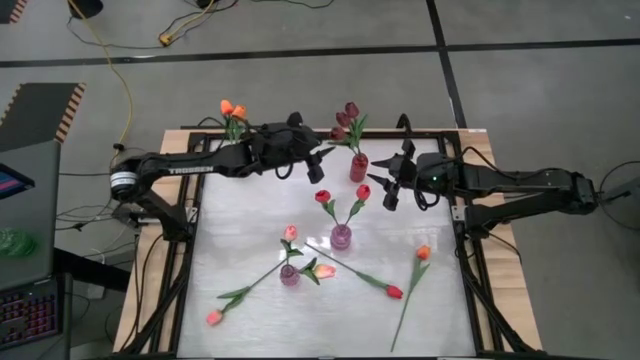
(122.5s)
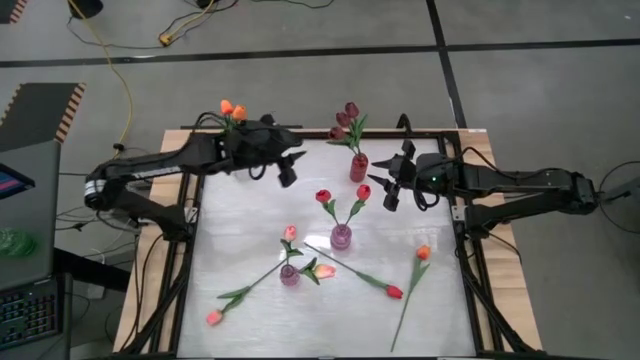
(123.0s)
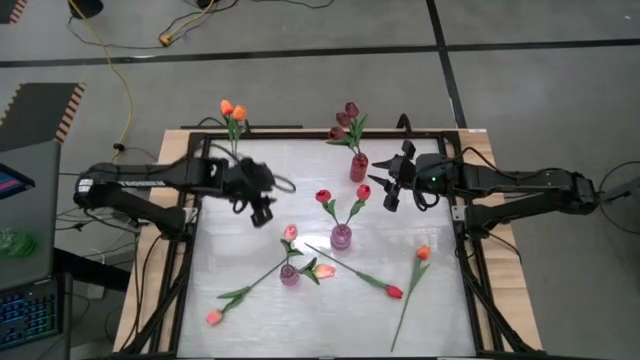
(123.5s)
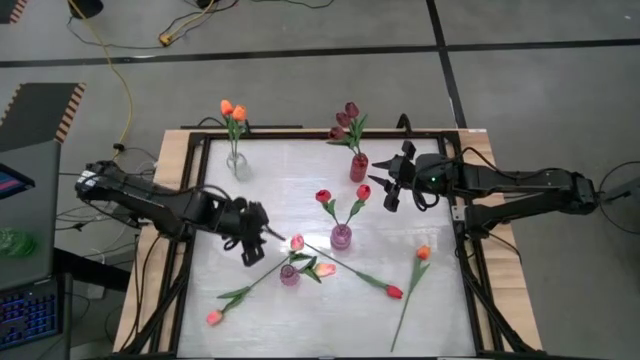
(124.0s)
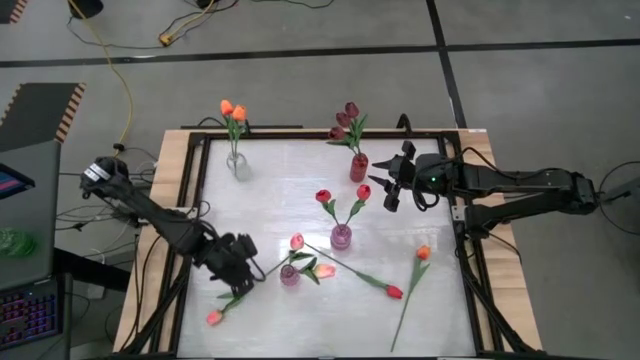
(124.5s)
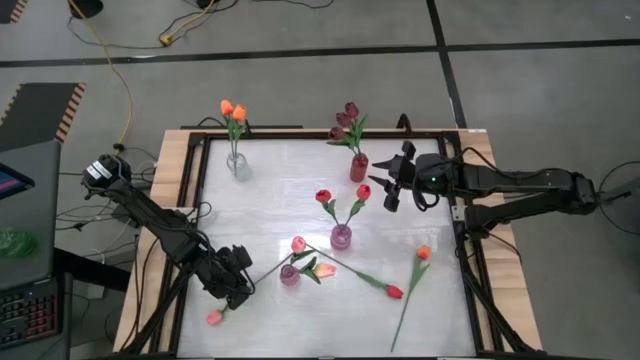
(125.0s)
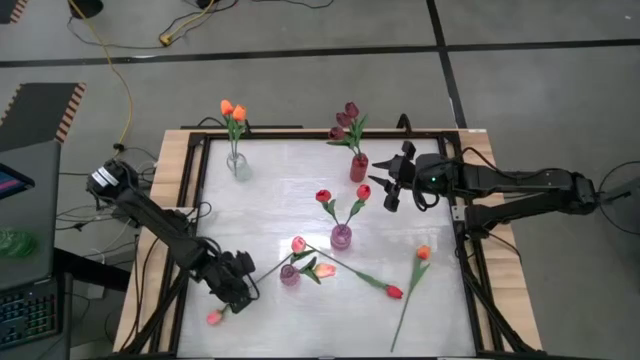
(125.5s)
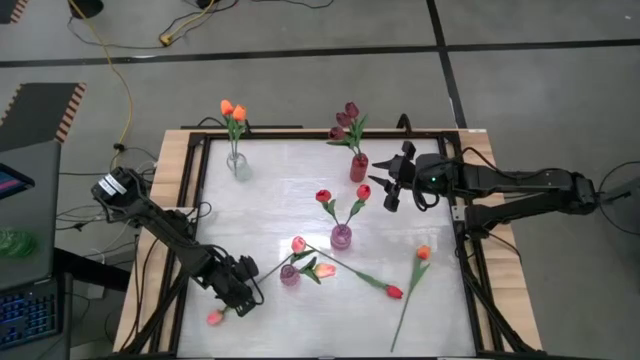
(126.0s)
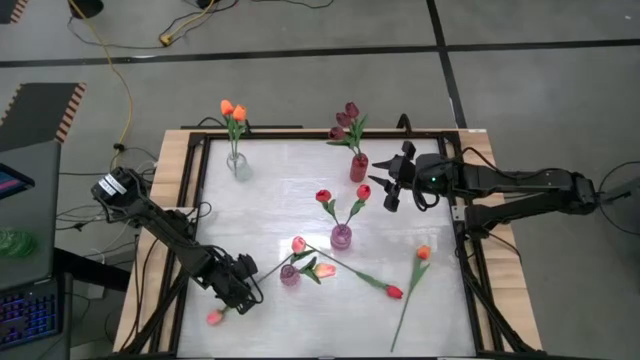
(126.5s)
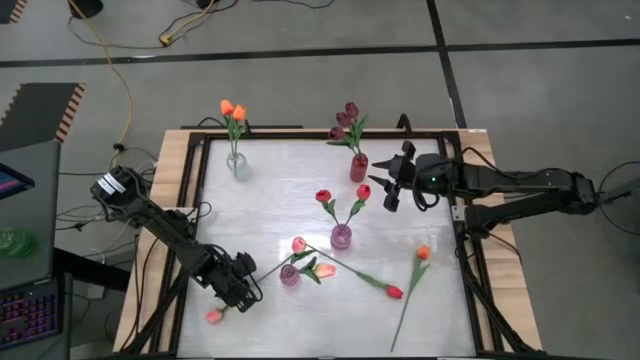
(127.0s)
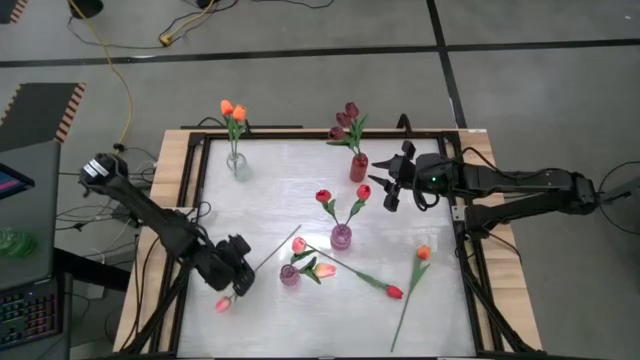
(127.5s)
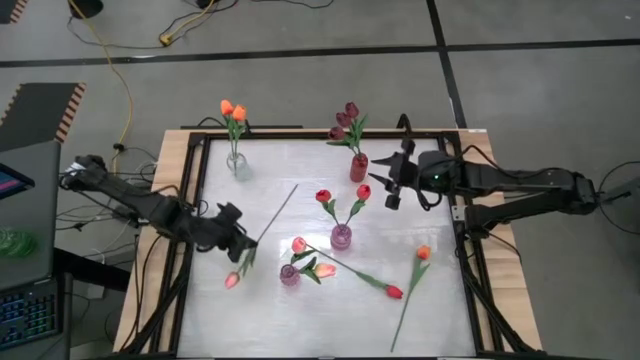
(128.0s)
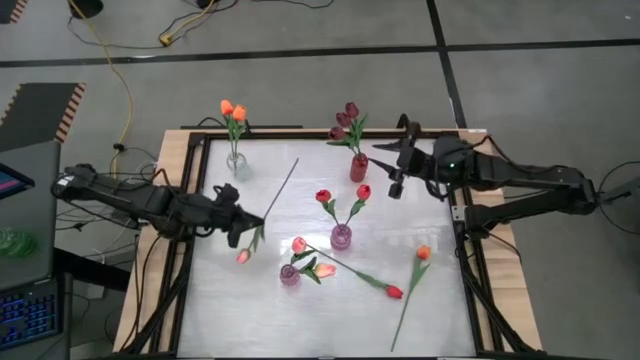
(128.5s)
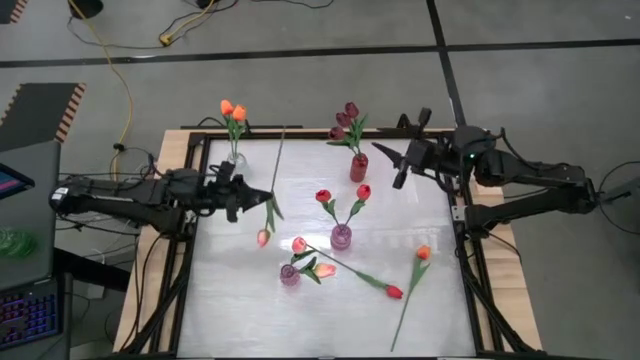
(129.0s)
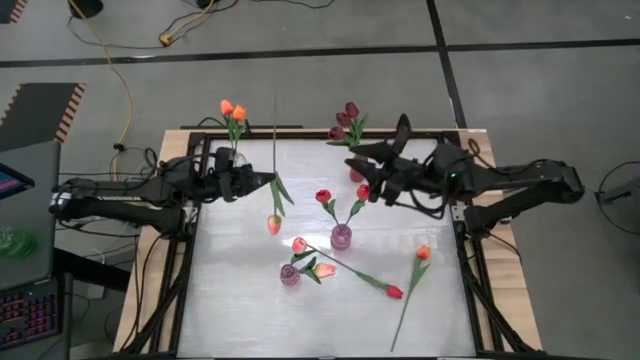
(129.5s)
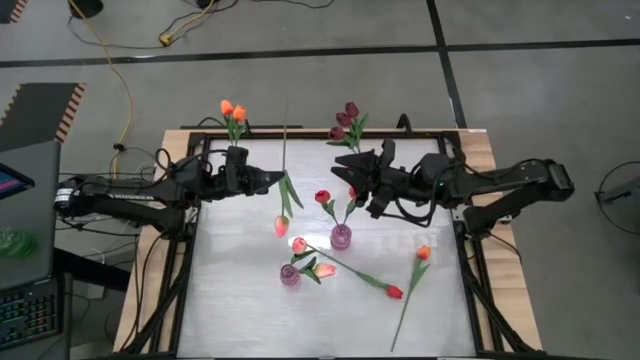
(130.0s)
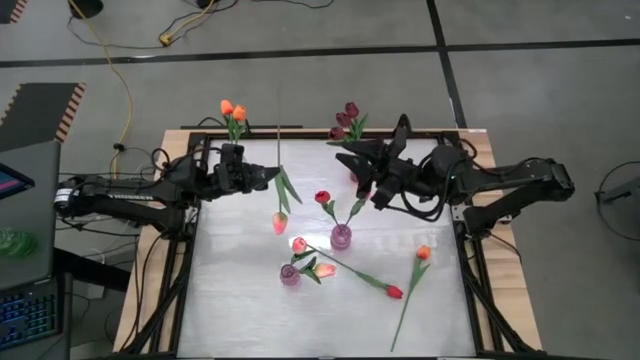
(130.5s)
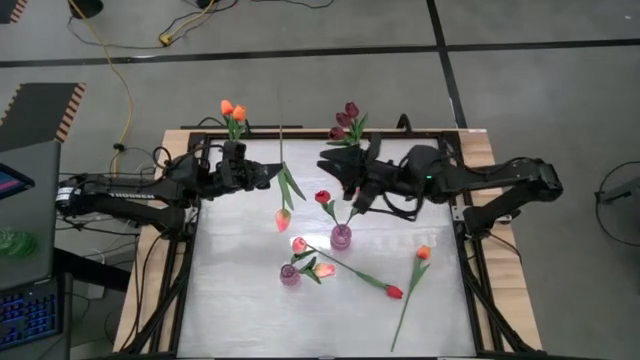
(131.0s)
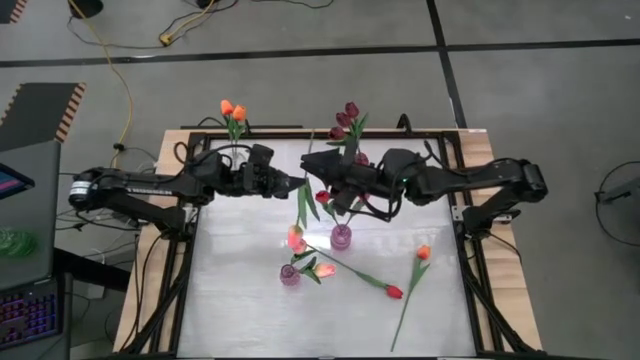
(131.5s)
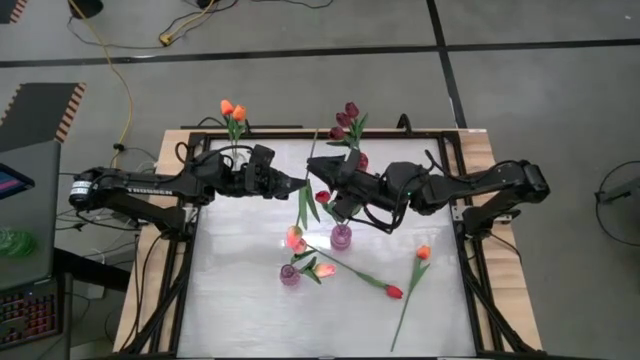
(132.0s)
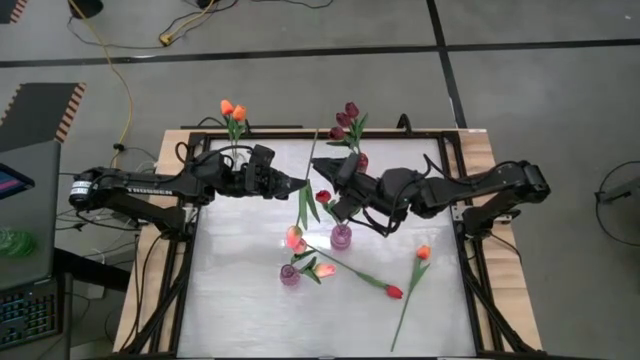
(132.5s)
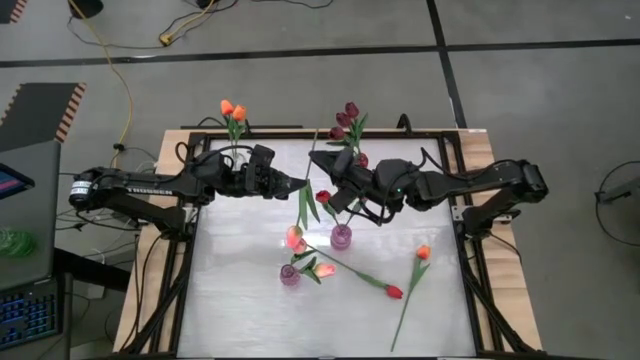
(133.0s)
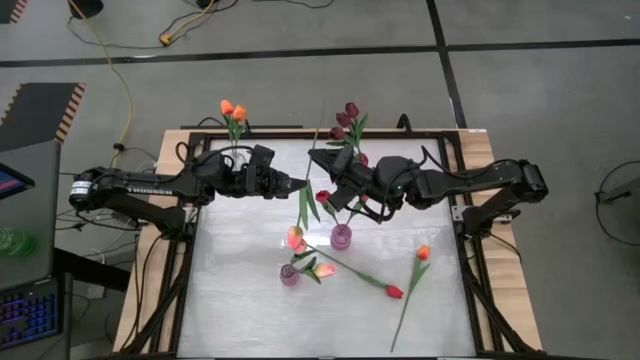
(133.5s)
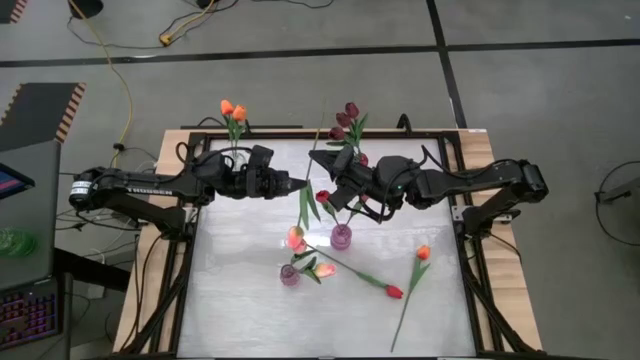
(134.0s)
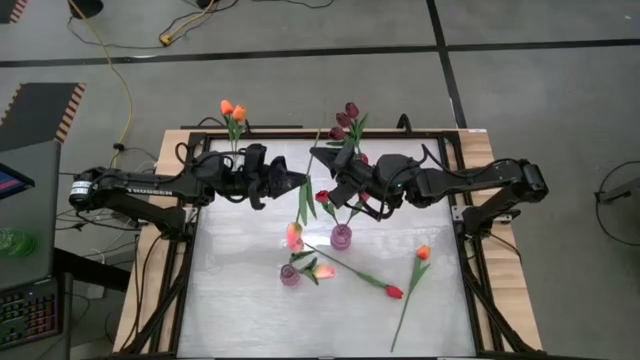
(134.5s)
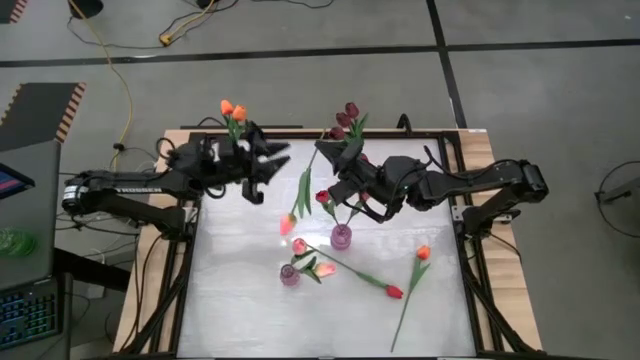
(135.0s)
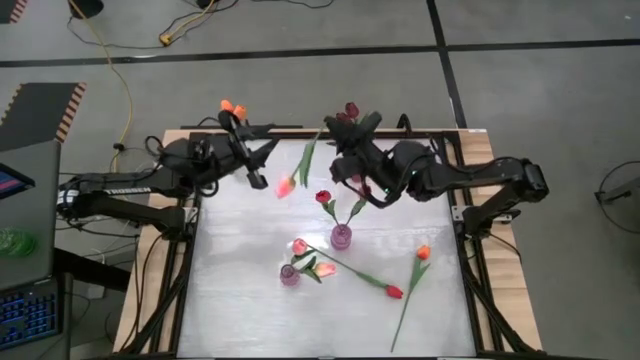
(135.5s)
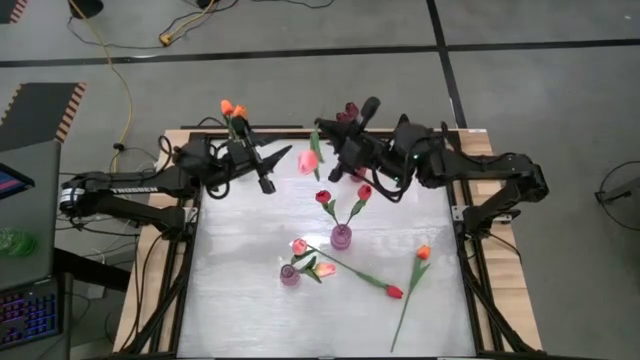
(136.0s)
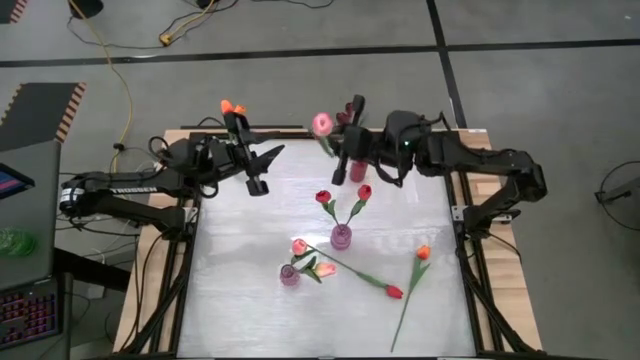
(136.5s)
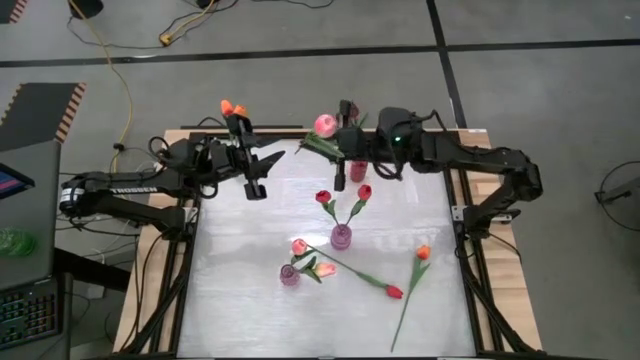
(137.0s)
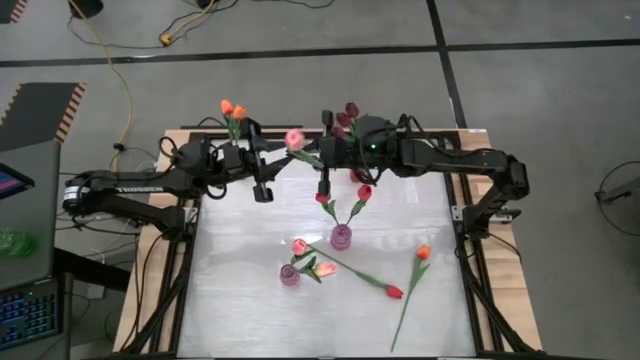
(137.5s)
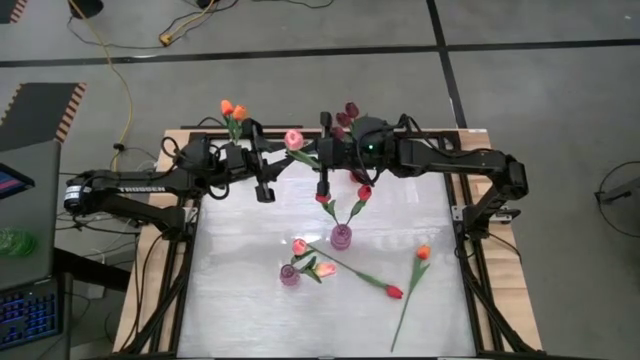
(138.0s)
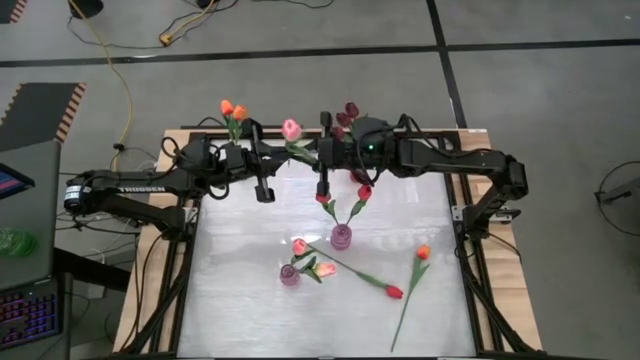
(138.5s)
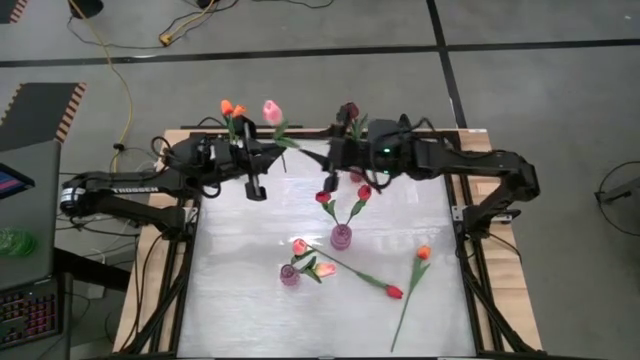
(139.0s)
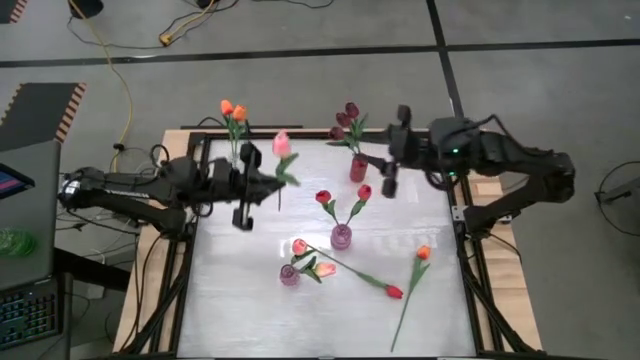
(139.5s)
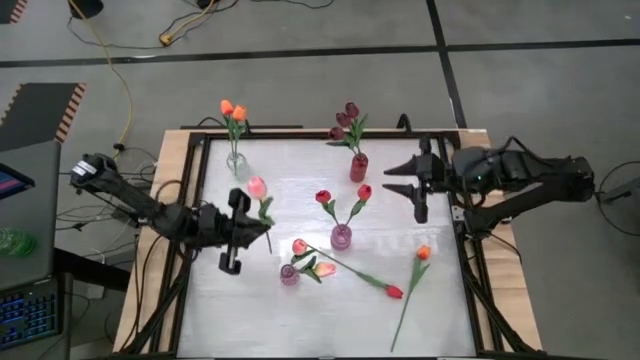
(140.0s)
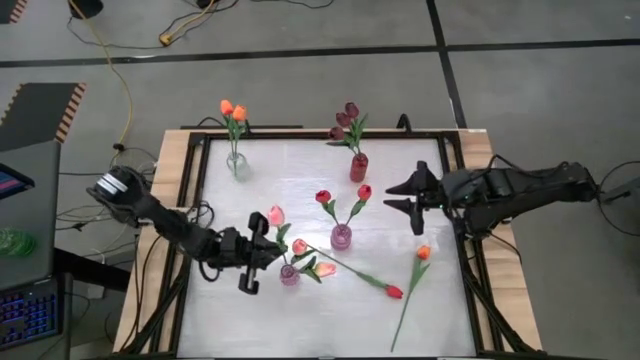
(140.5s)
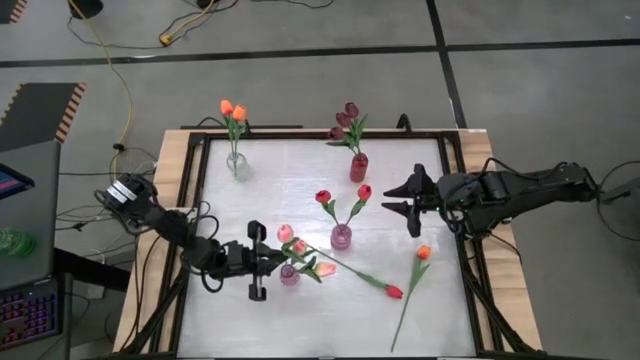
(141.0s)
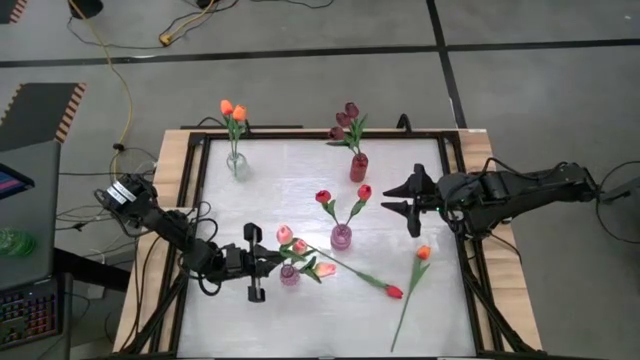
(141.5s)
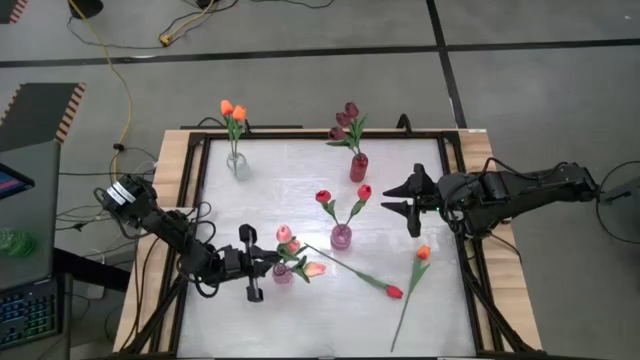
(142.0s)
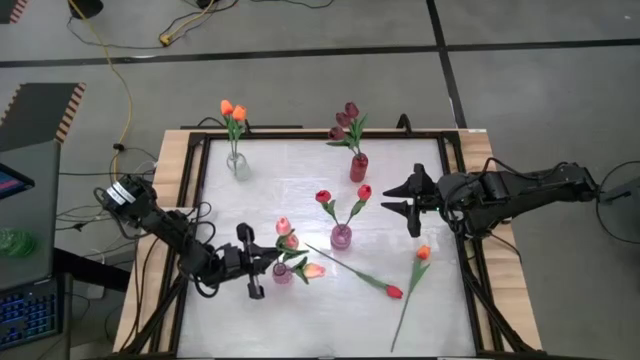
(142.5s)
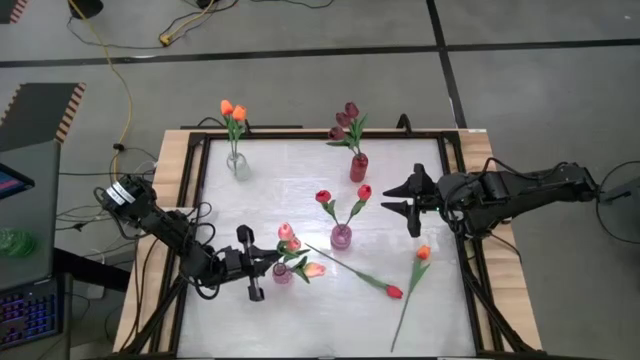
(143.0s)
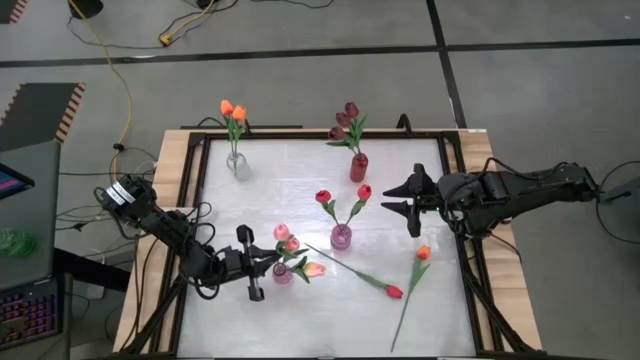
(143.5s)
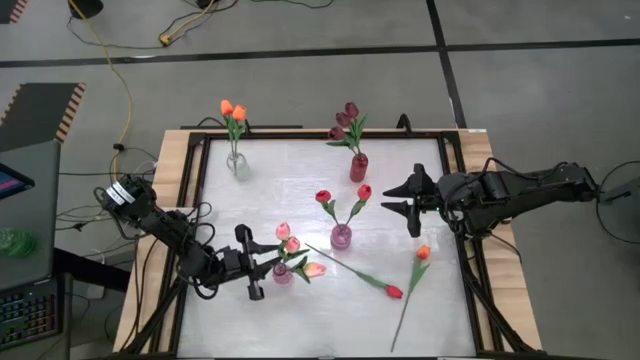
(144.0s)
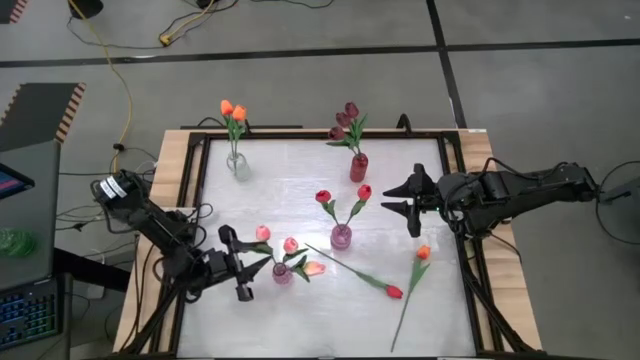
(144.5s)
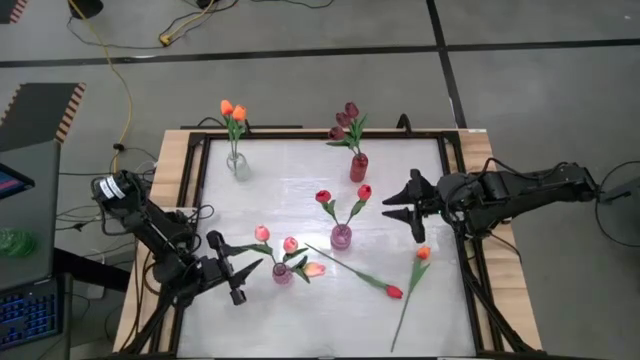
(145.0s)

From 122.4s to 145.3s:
Task: Sort flowers into vase by color
Put the pink flower into the bottom purple vase
